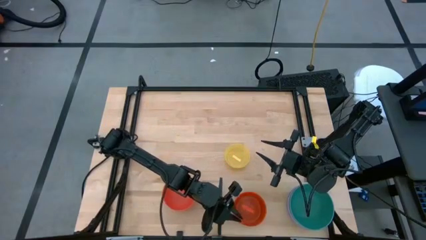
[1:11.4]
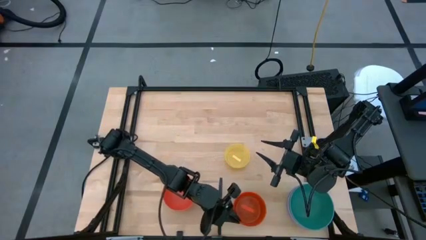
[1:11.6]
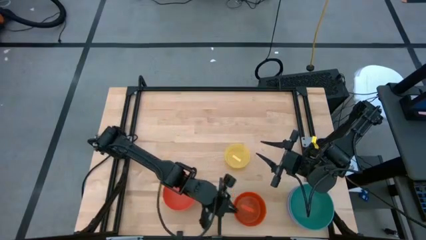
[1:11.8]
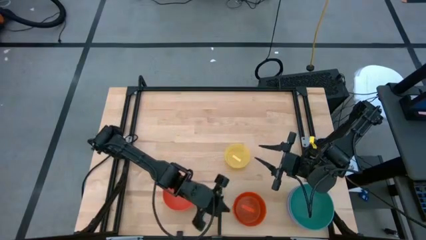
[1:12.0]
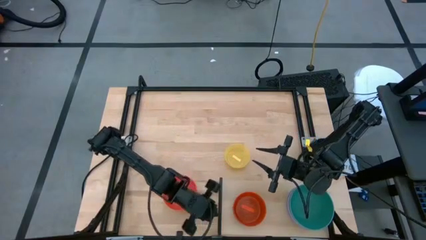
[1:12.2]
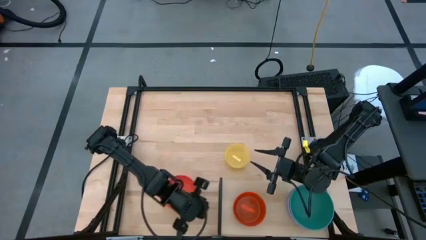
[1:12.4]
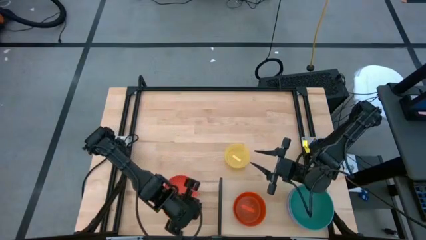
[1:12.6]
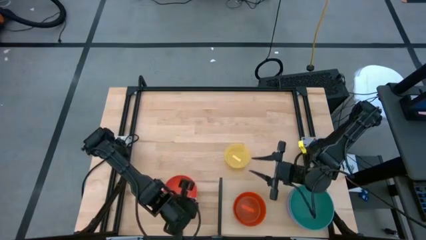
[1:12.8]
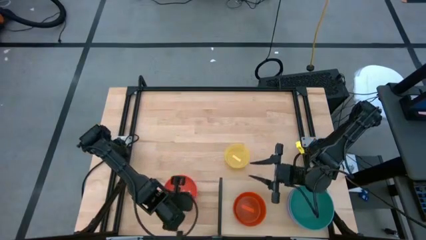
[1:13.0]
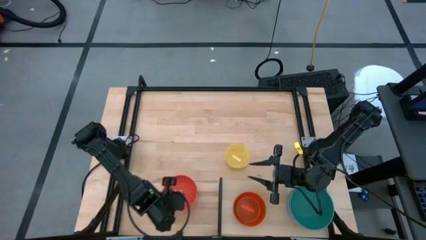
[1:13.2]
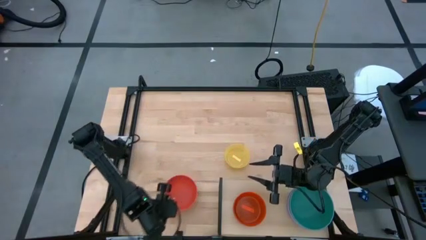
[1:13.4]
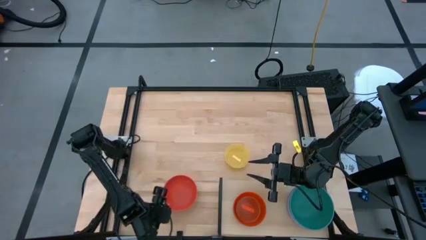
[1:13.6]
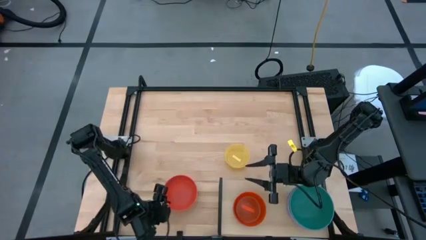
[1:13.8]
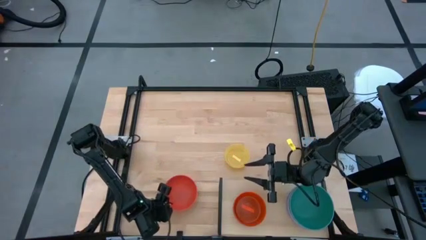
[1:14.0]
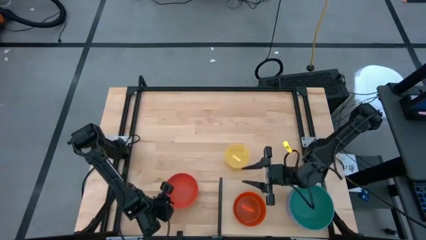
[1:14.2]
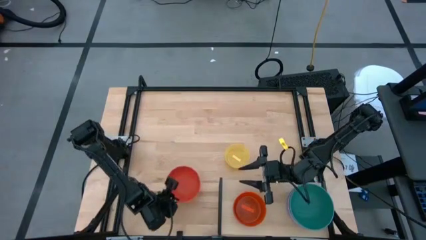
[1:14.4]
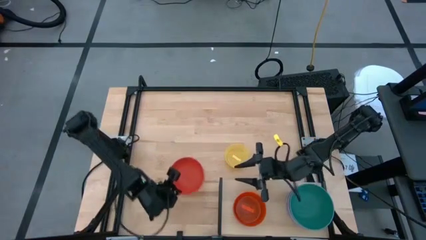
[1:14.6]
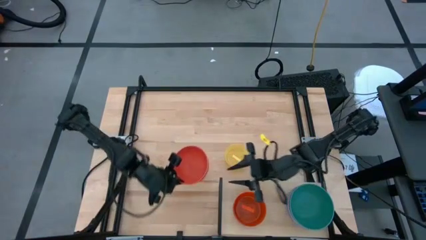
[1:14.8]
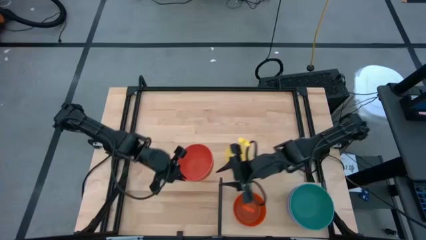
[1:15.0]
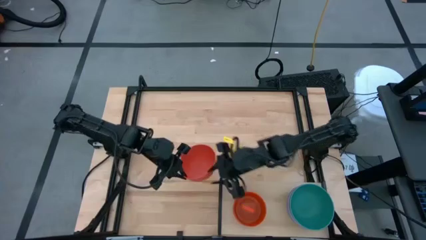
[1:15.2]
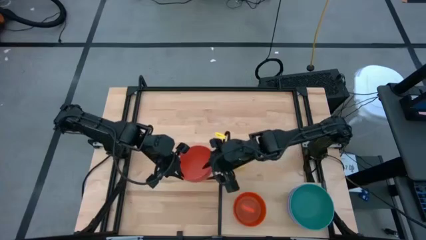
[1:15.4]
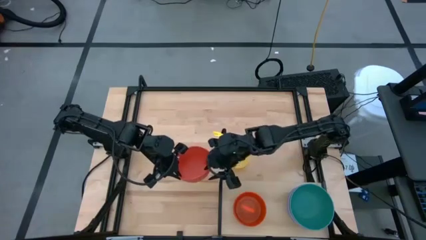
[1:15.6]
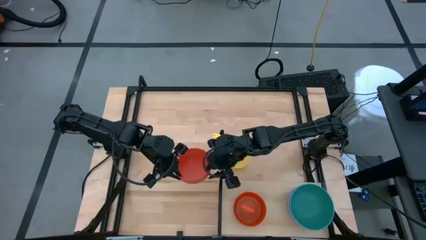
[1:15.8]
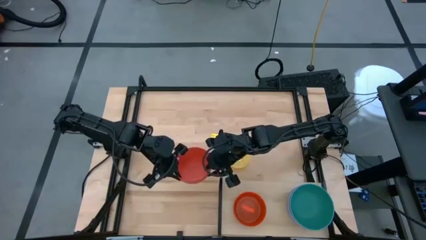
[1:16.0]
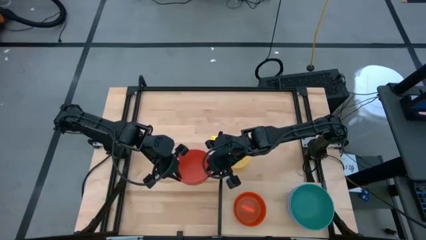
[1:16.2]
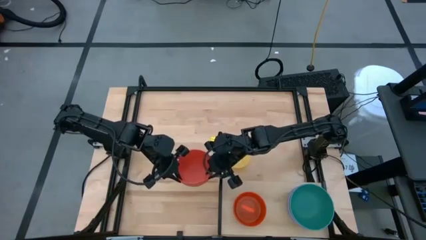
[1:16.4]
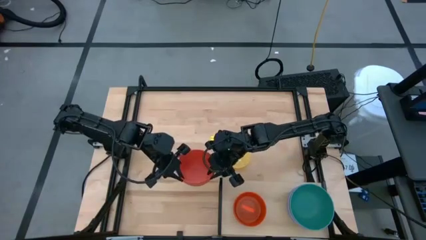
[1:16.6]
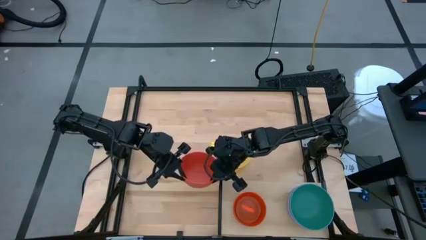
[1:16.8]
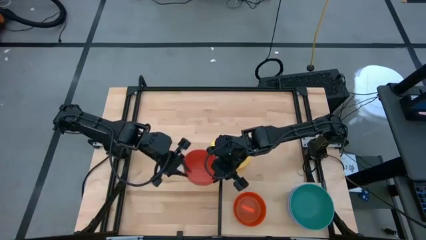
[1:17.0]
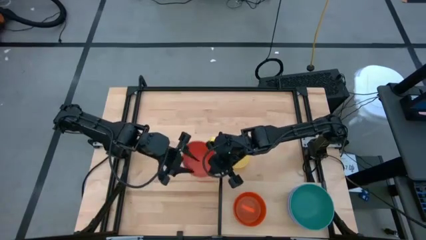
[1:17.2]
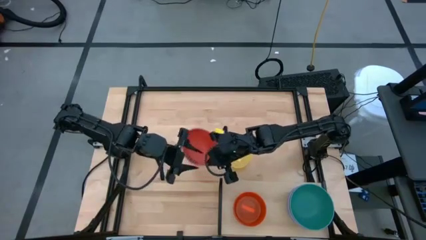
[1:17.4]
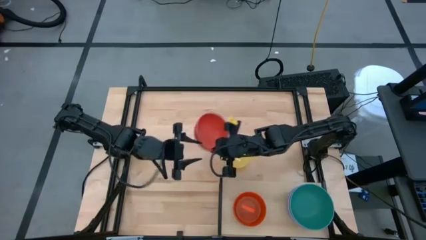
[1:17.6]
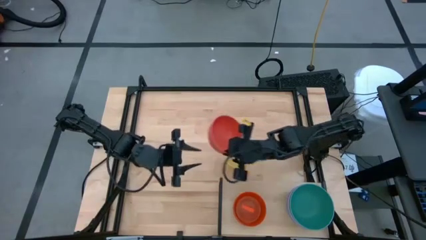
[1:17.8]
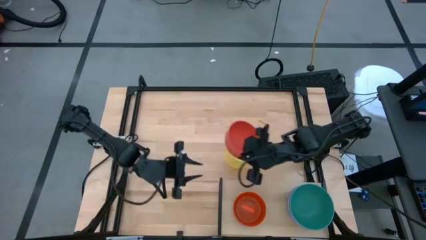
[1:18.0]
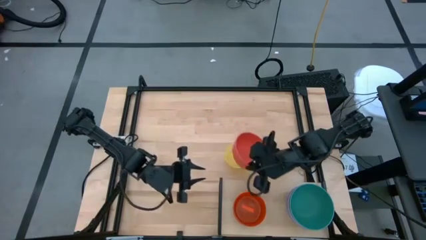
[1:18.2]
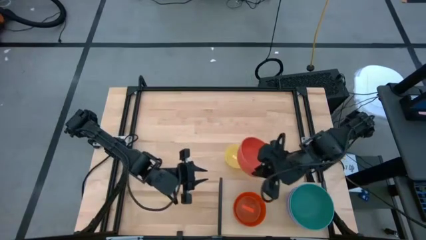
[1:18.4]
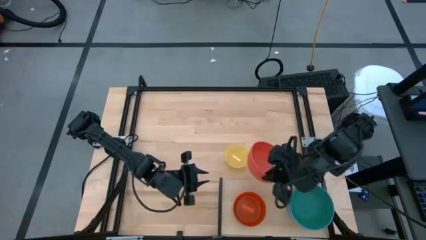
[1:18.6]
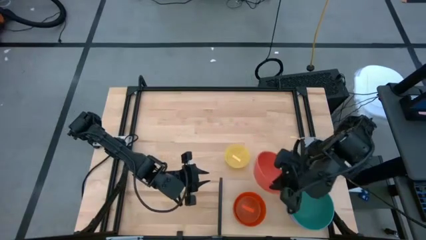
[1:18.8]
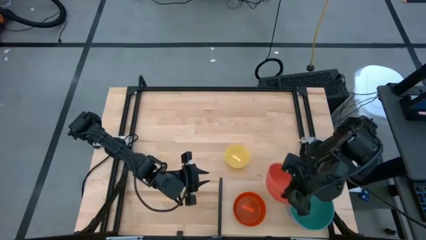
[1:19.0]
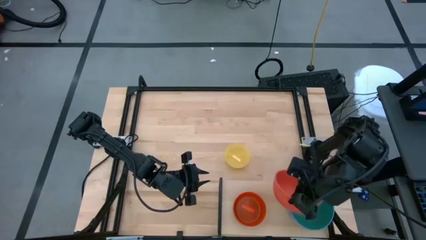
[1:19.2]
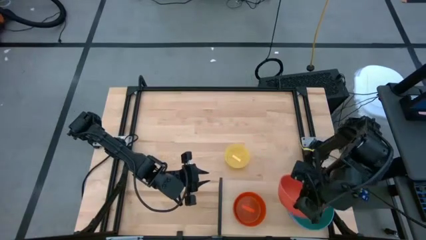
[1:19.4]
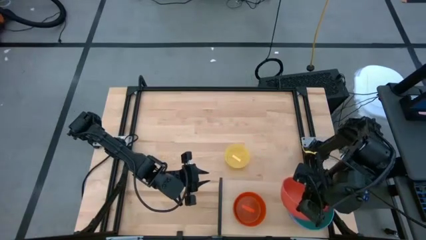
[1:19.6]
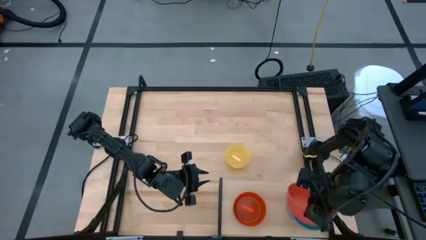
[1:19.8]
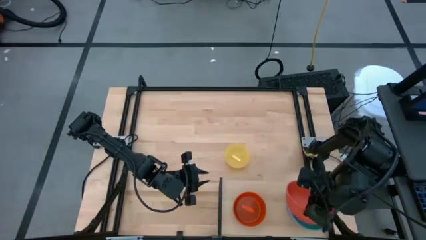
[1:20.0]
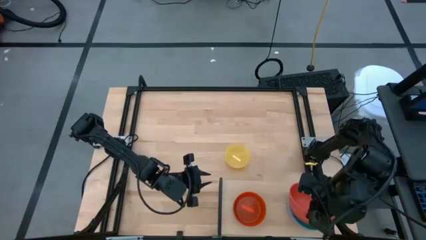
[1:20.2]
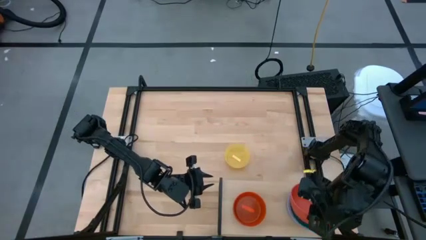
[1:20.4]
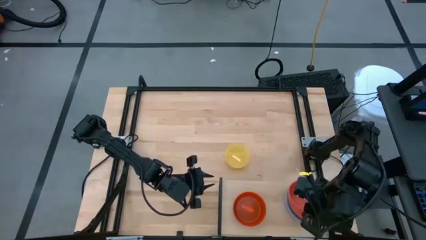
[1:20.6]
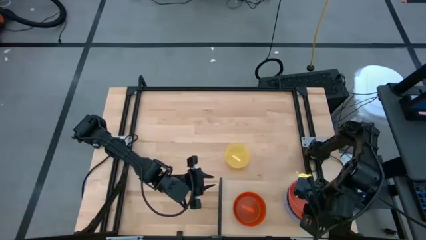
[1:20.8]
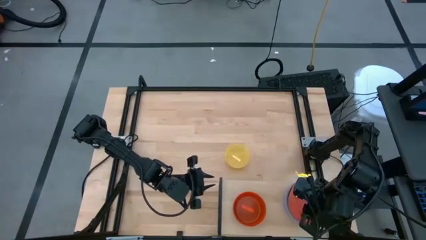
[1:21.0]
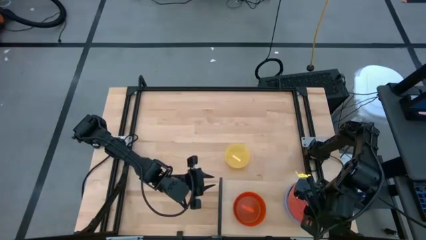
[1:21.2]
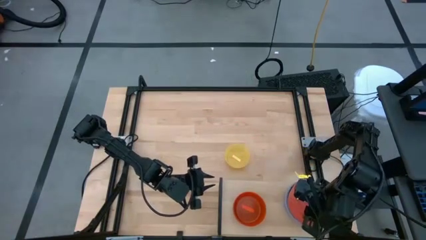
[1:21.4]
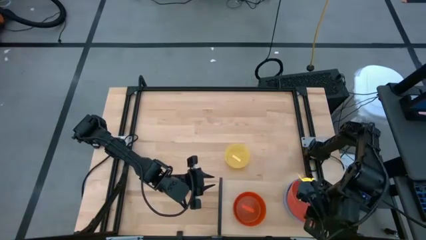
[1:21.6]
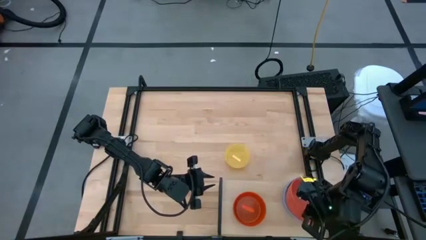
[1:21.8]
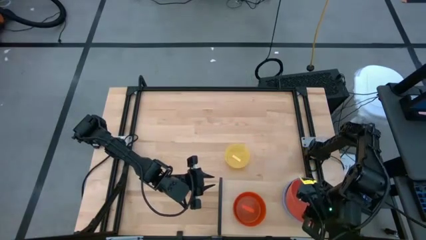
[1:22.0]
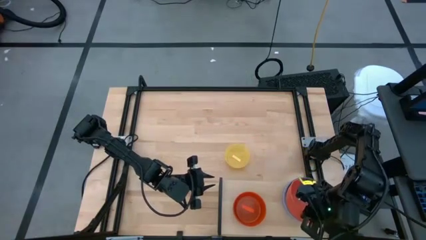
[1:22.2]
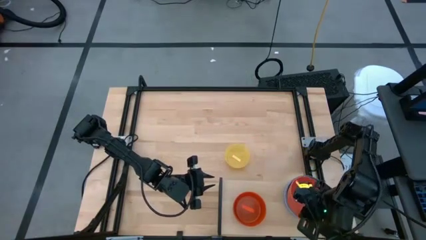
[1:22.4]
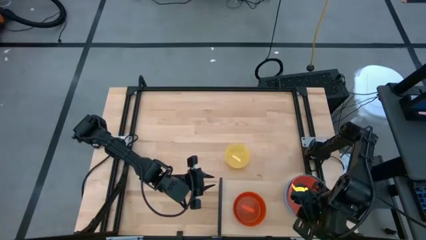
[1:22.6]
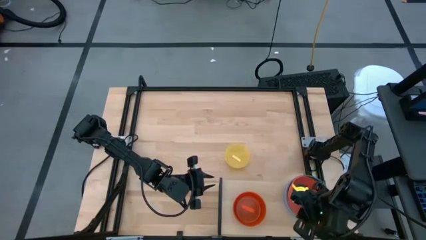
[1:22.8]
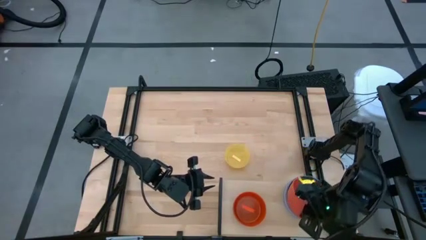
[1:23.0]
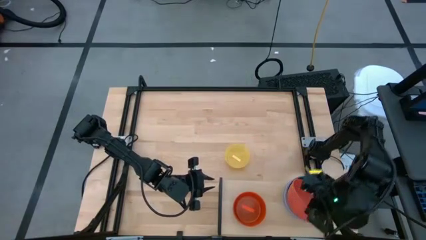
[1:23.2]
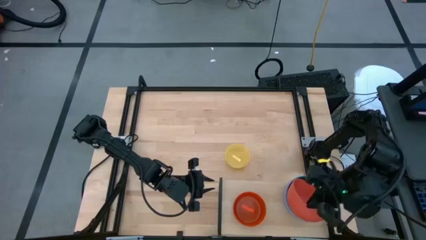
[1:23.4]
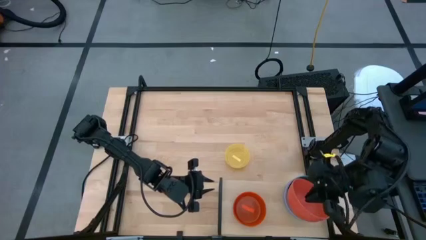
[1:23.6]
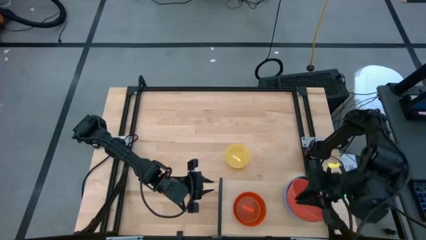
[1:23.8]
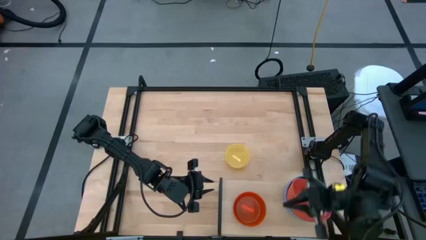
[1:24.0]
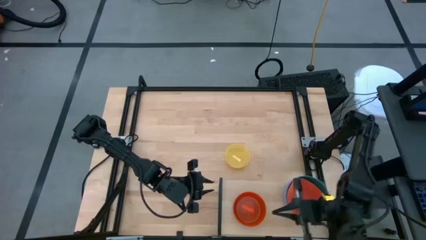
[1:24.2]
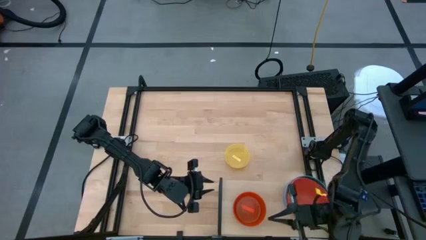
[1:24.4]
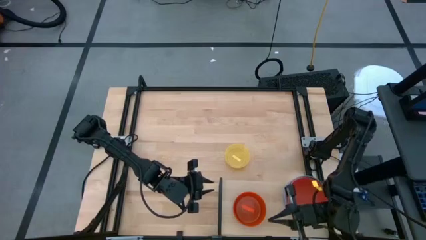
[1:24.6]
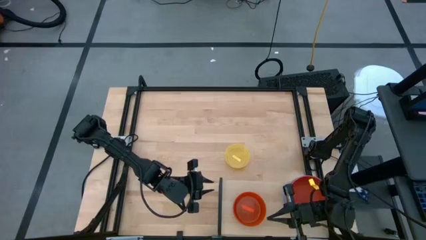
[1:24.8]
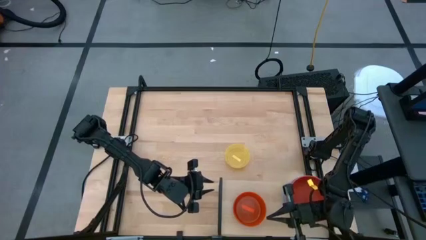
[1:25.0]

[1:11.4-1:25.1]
Task: Place and stack bowls onto a shelf
Stack the orange bowl on top of the green bowl on the shelf

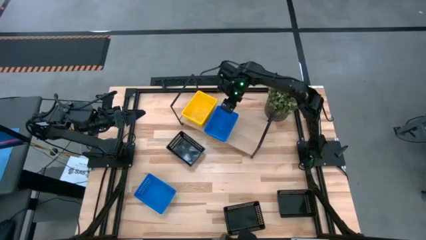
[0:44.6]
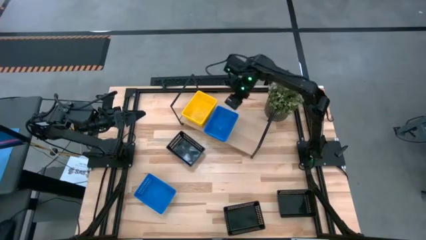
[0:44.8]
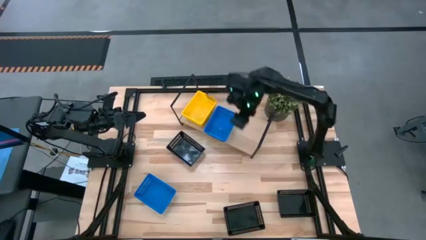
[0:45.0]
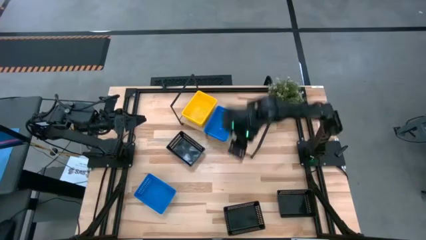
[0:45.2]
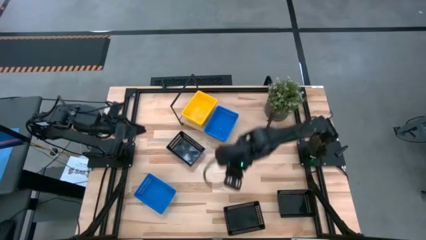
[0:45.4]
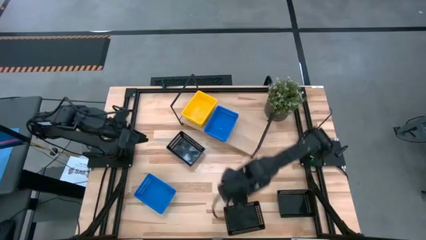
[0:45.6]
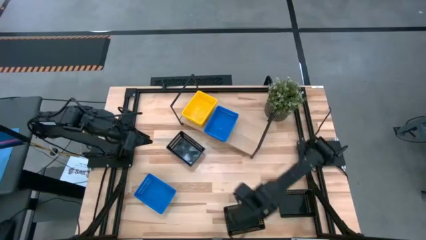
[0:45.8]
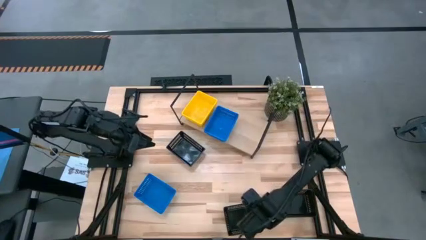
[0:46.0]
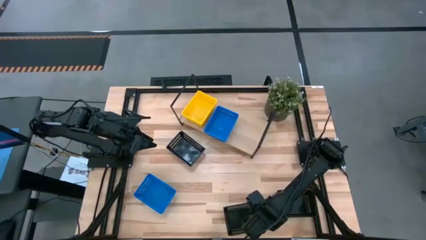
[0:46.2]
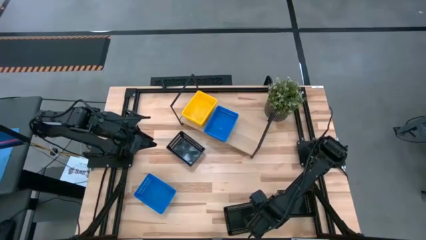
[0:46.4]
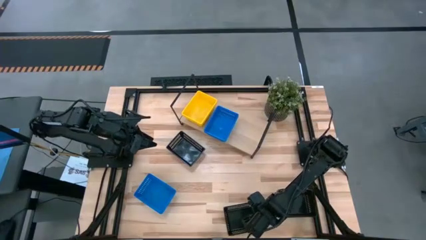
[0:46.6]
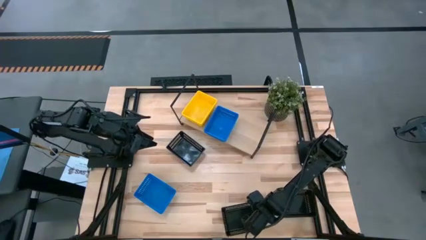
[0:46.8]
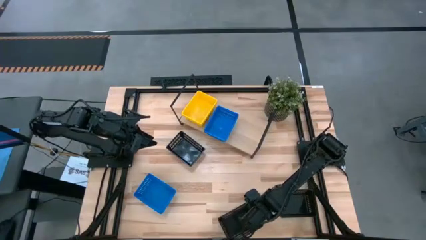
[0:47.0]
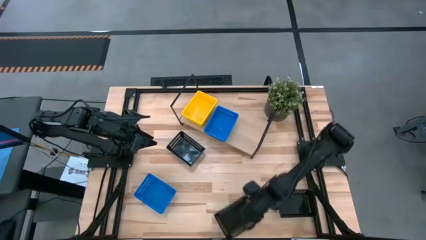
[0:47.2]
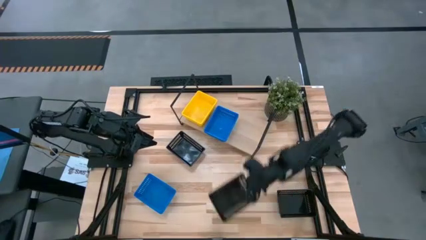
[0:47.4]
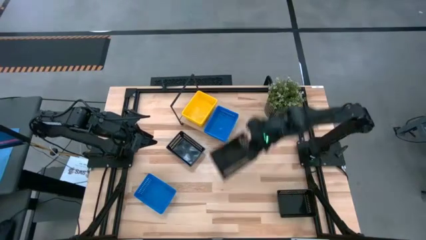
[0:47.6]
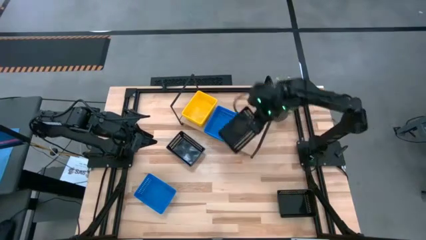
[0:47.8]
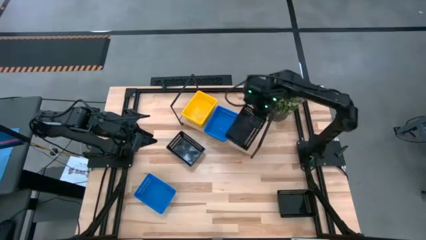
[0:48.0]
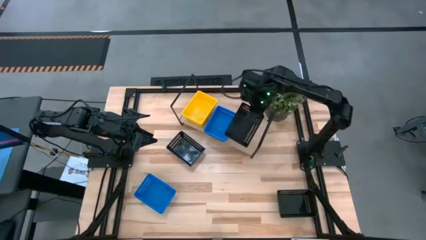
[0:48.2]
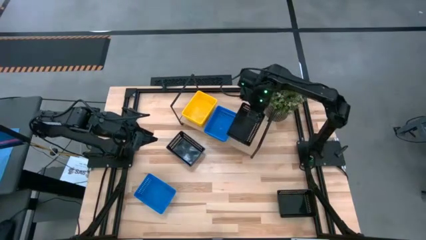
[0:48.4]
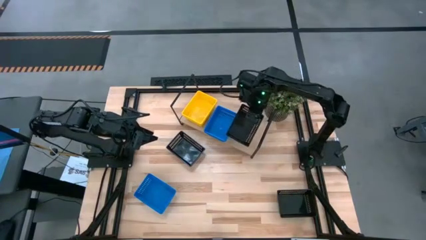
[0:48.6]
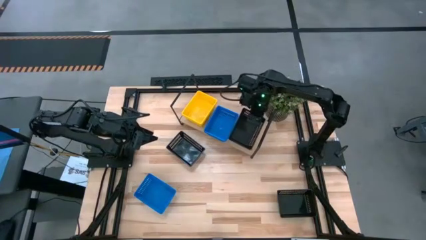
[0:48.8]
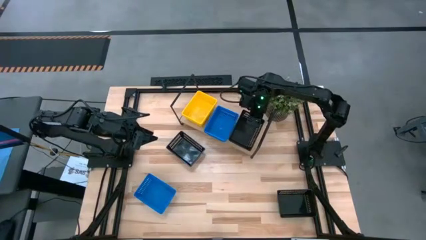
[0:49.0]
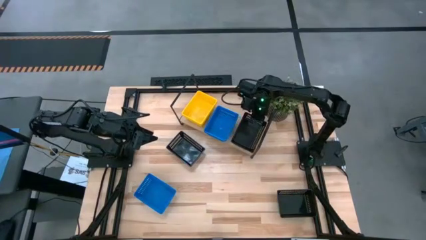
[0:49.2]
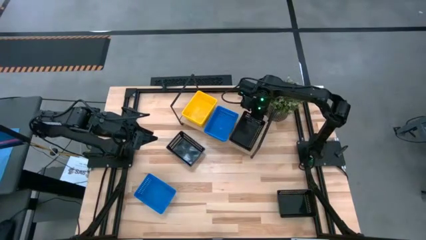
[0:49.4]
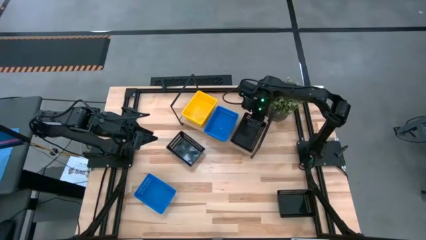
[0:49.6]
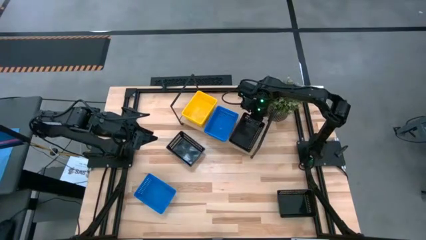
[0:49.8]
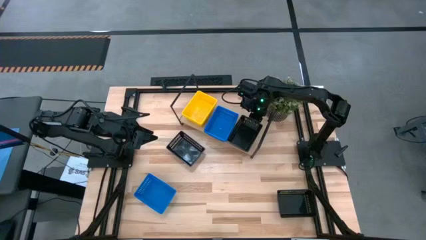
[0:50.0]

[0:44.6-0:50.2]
Task: Stack baskets on shelf by color
Put the middle black bin on the shelf
